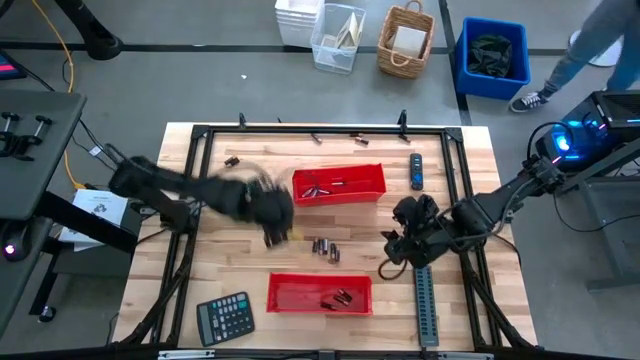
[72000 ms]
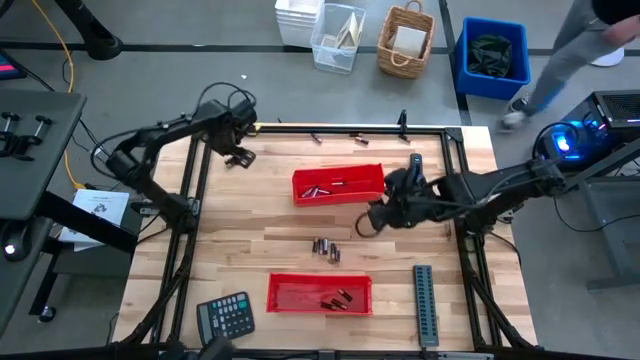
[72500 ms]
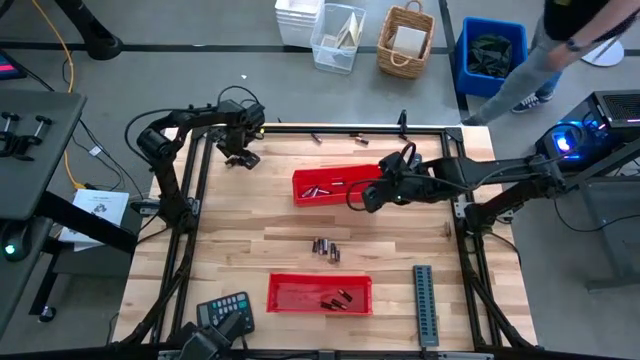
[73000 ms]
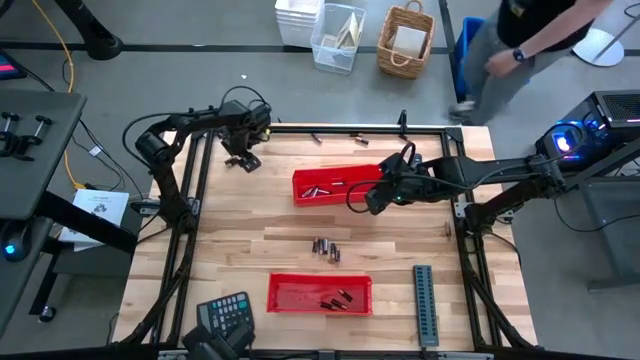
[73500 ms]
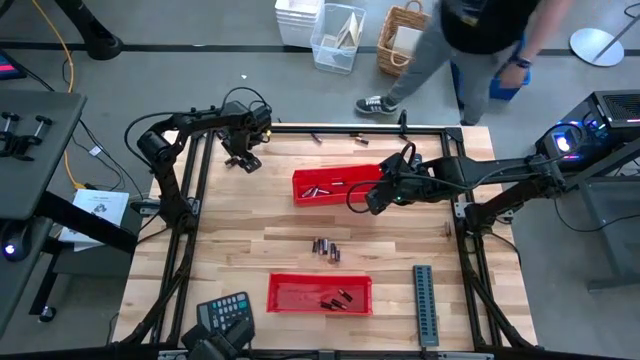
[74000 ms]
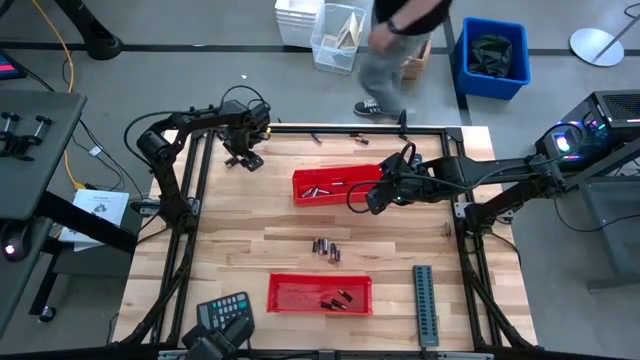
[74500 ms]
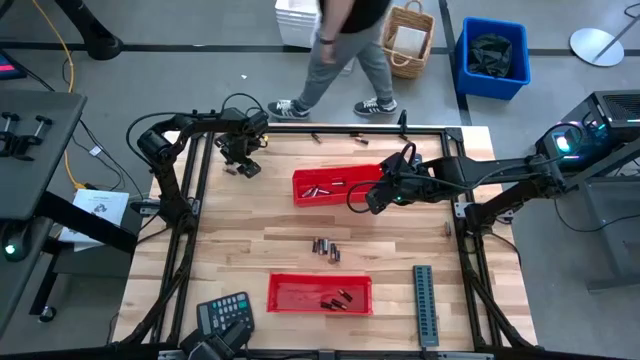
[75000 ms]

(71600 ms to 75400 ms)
Task: Sort batteries
Put the black battery into the bottom red bin

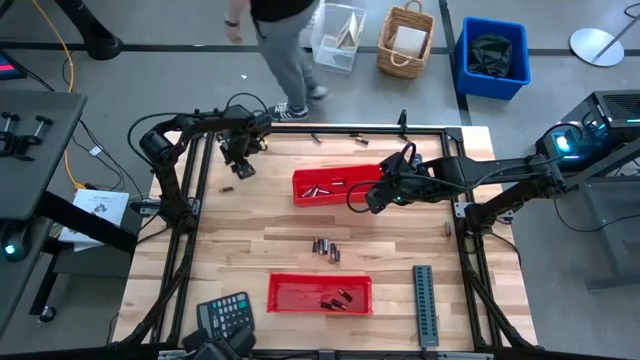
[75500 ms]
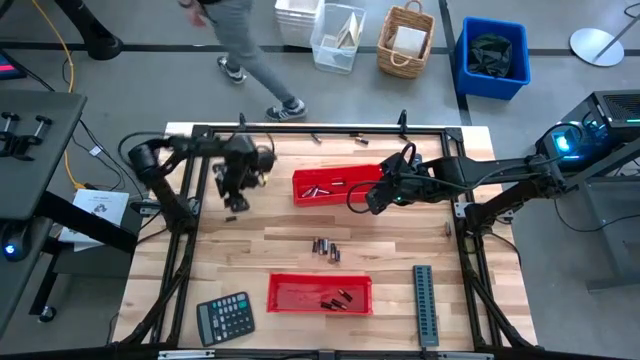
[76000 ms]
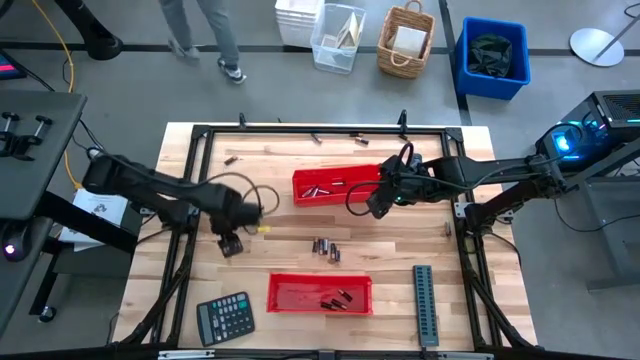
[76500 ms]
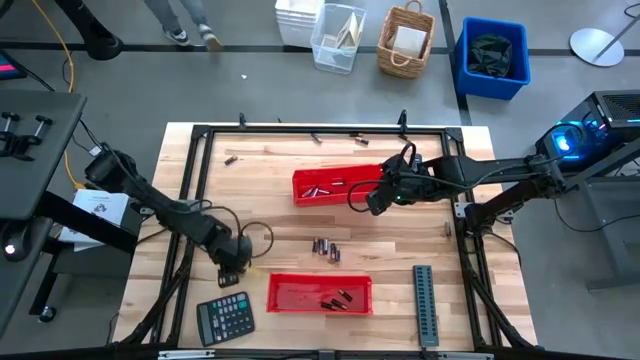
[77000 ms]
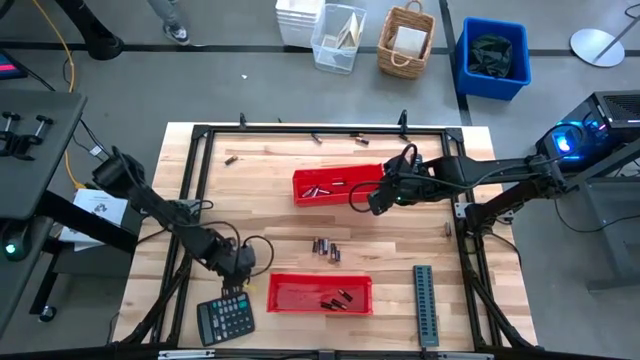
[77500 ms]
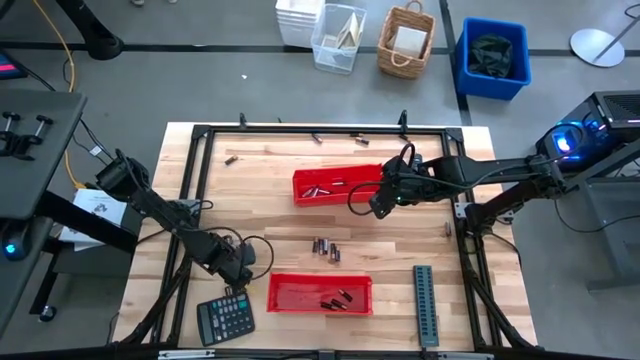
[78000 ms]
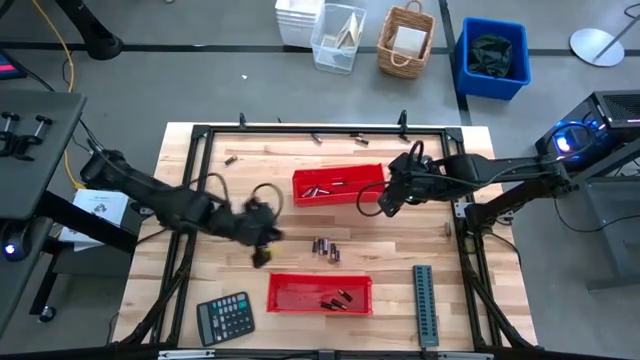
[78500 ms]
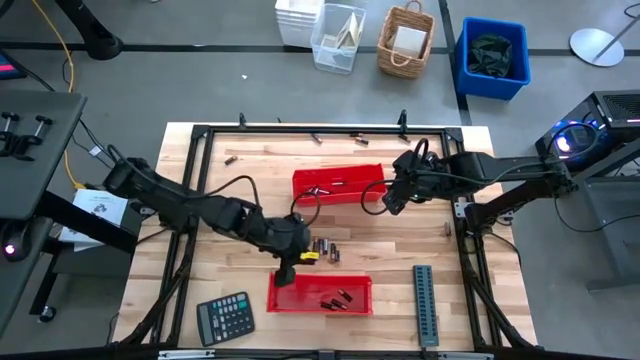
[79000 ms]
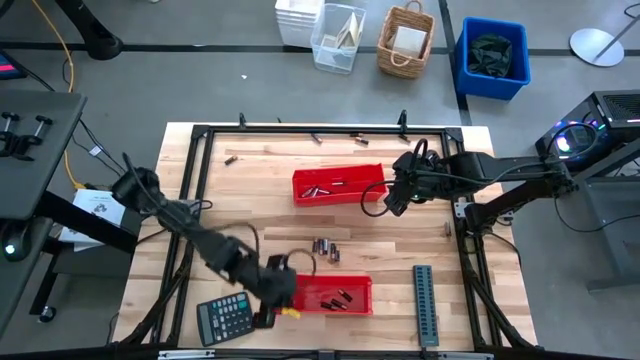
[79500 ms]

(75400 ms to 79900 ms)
Put the black battery into the bottom red bin

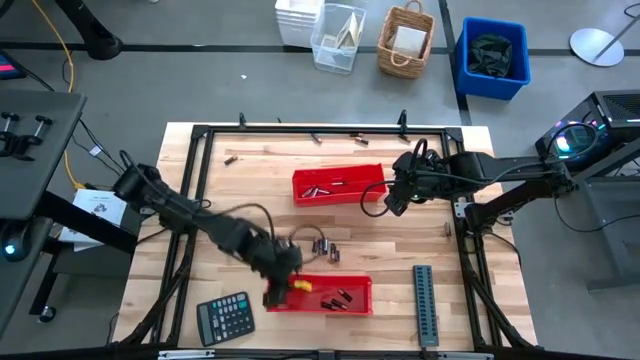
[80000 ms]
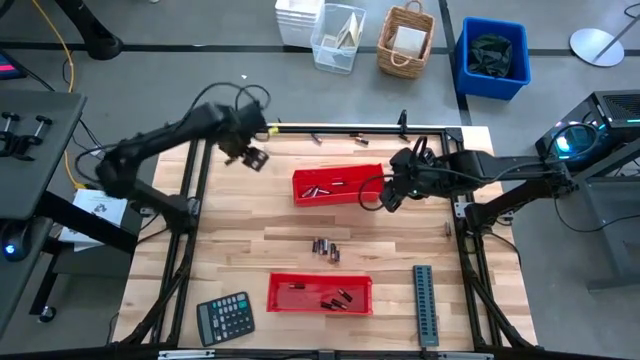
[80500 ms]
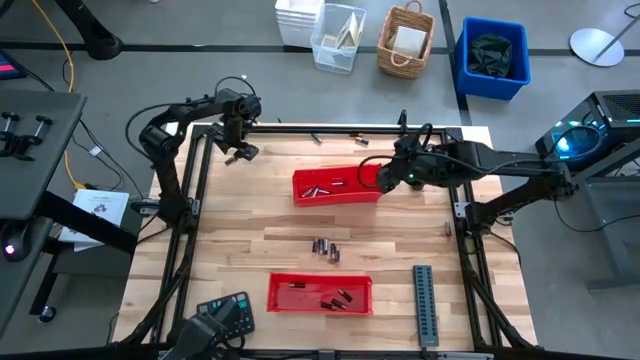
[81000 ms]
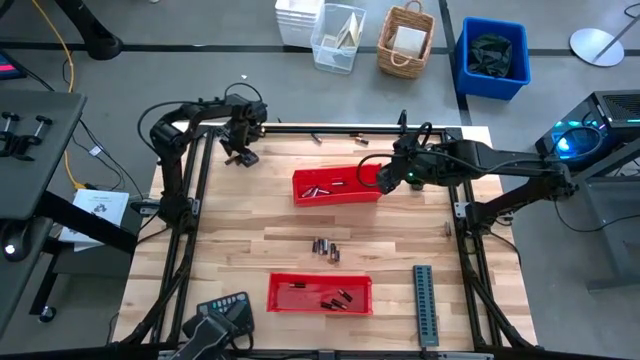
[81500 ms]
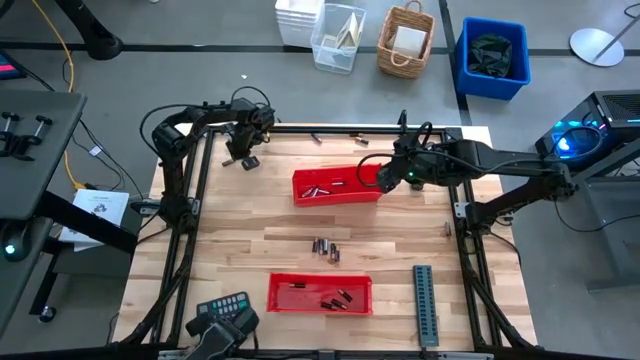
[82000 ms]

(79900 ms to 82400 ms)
Put the black battery into the bottom red bin

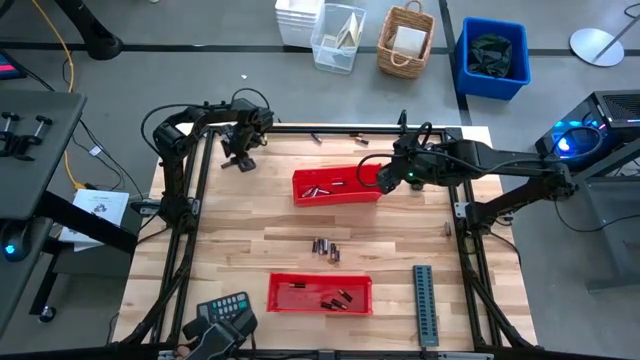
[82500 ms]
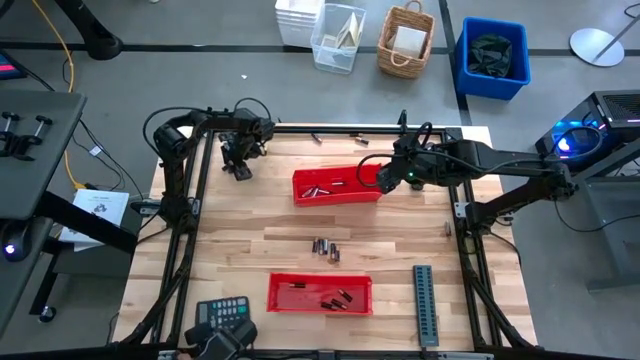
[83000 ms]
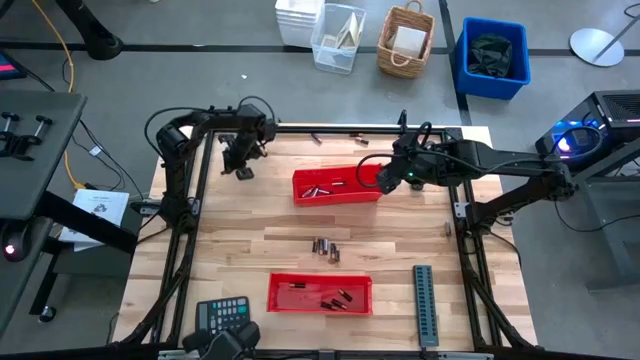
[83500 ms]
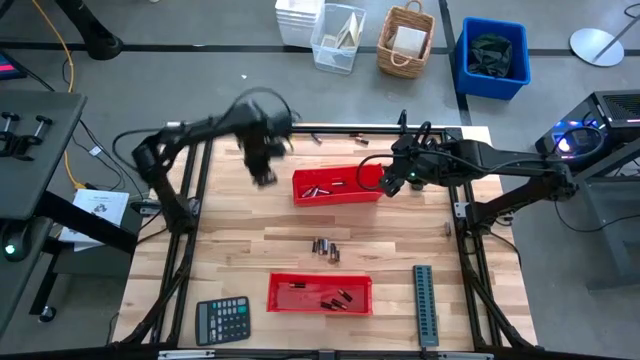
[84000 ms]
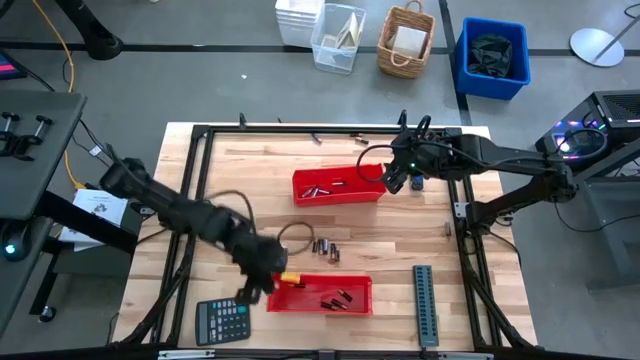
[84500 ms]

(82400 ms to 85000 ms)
Put the black battery into the bottom red bin

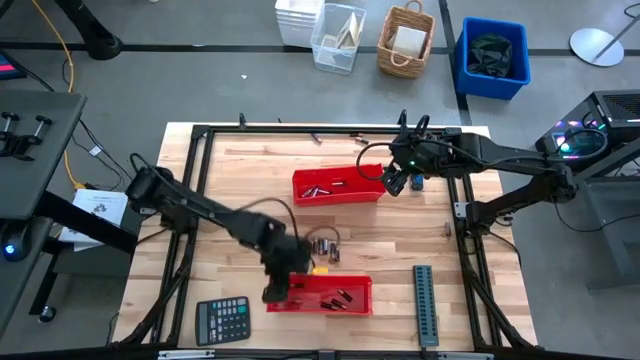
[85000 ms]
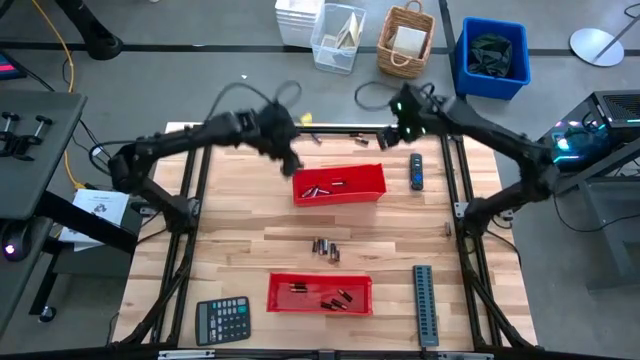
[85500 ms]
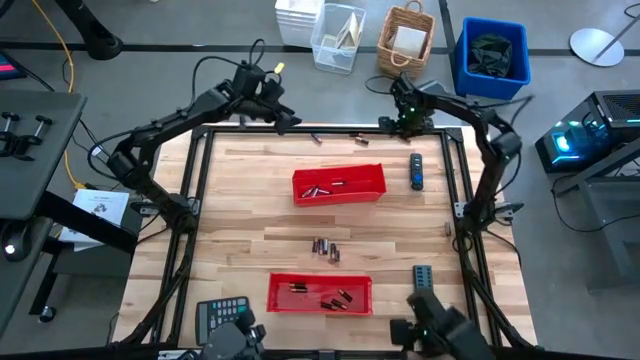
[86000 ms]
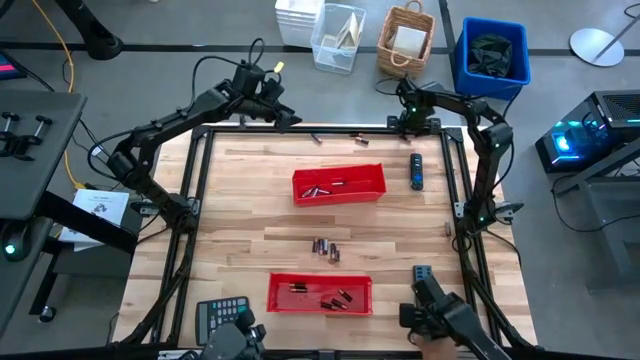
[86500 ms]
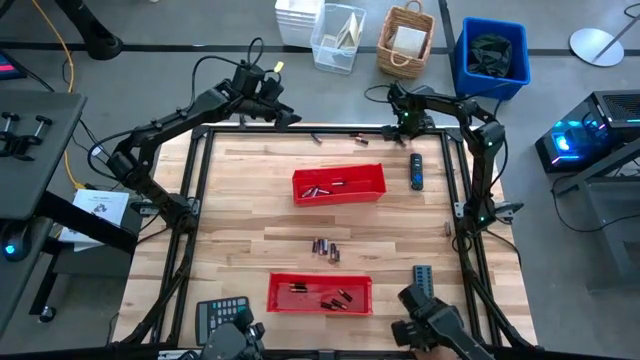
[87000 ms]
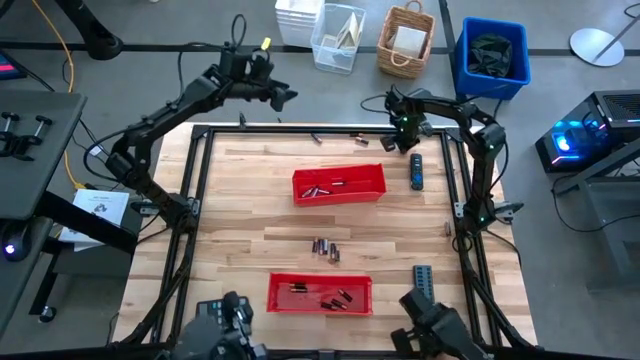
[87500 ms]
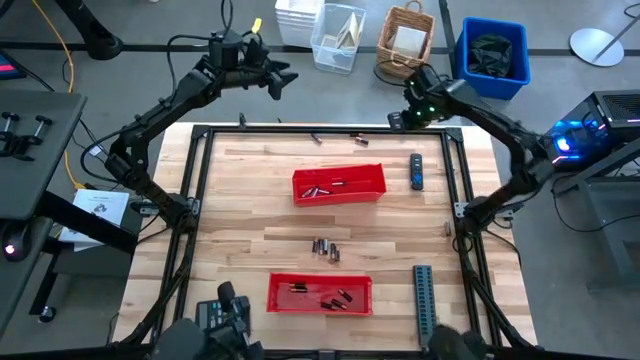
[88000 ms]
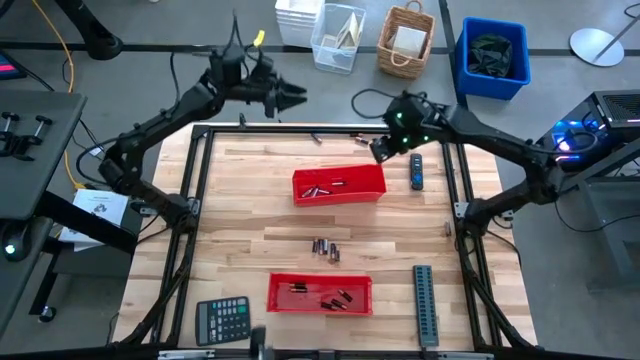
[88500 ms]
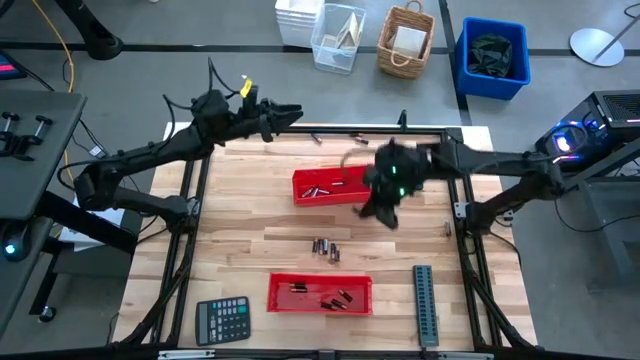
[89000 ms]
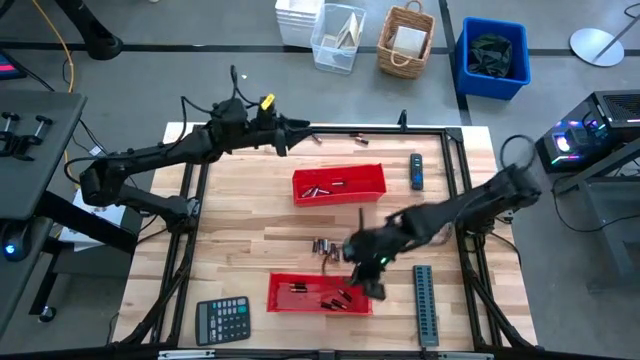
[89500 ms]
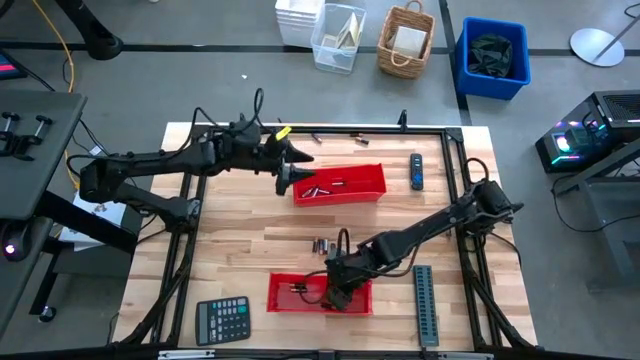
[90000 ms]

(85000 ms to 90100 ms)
Put the black battery into the bottom red bin

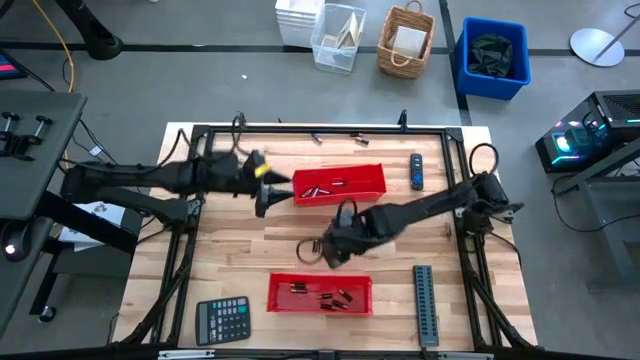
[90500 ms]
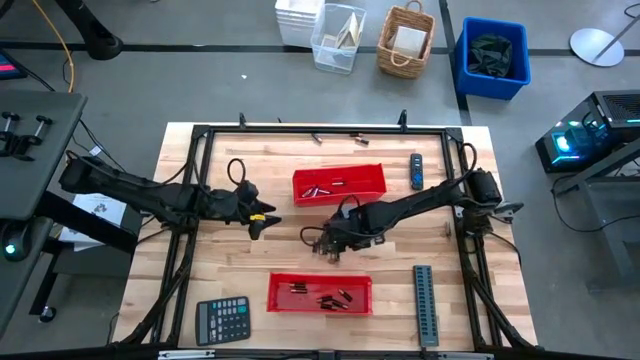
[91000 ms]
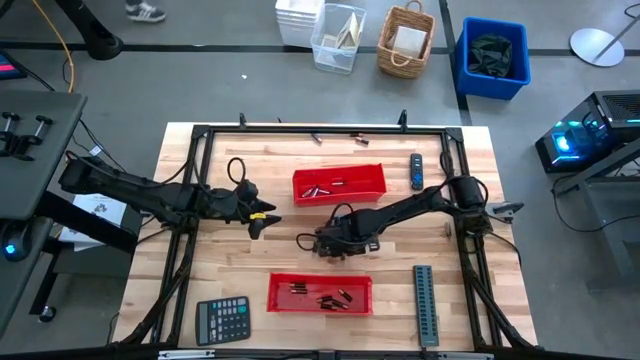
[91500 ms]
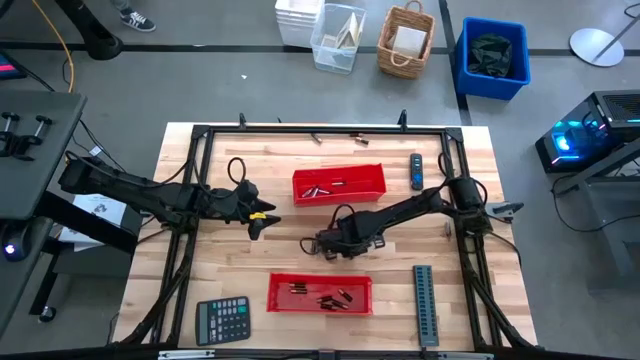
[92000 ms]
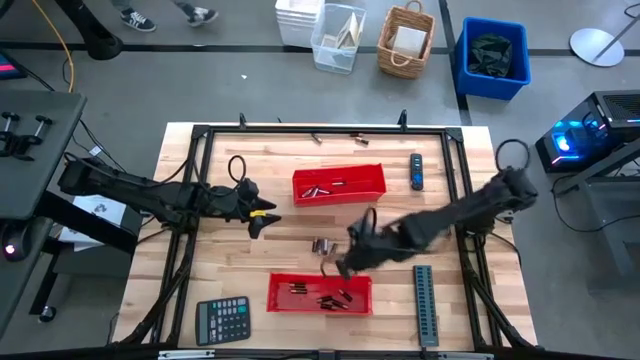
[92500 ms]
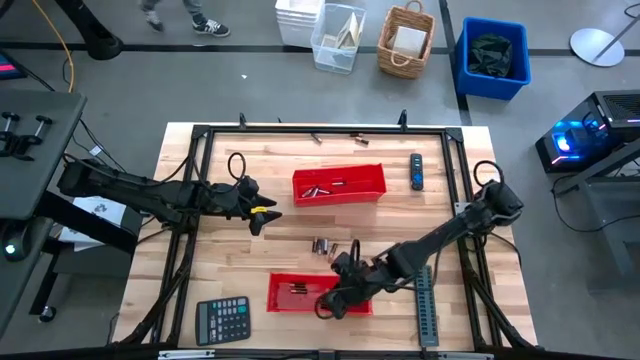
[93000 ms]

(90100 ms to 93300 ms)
Put the black battery into the bottom red bin

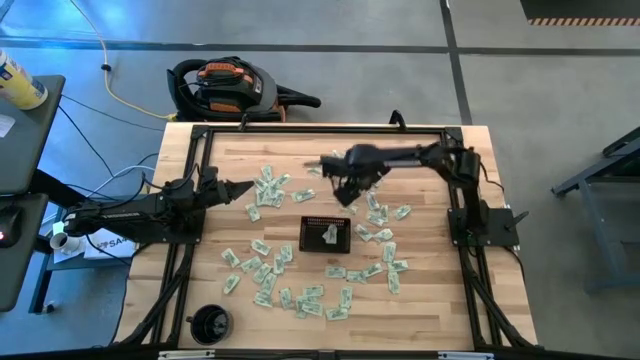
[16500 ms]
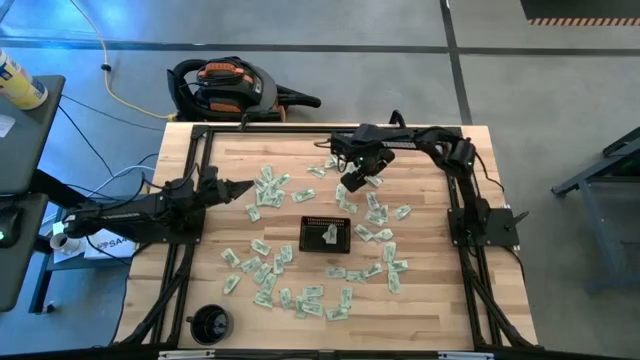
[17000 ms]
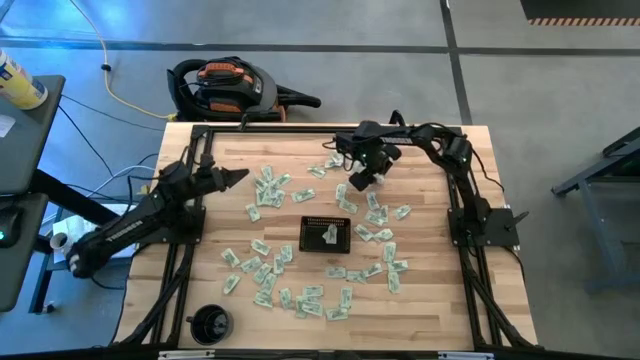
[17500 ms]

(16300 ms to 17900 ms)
Task: Pick and place Stevia / Truvia into bins
Put the green stevia packet into the black basket
